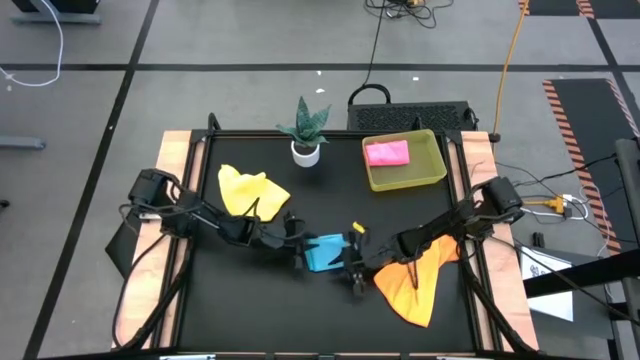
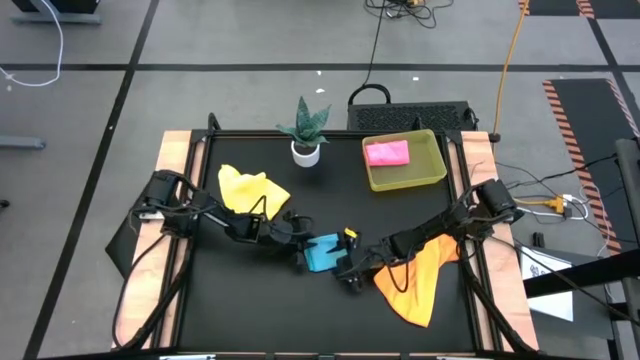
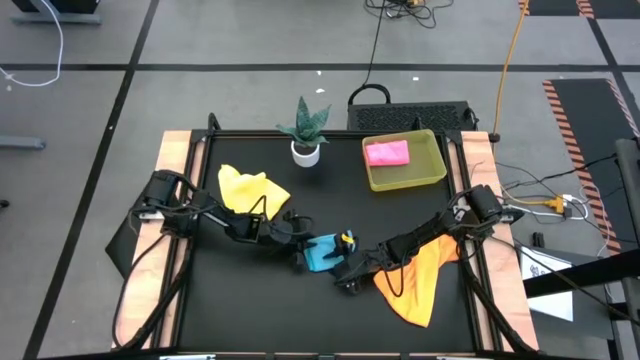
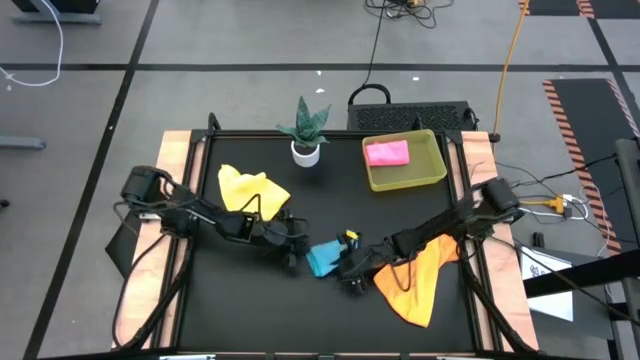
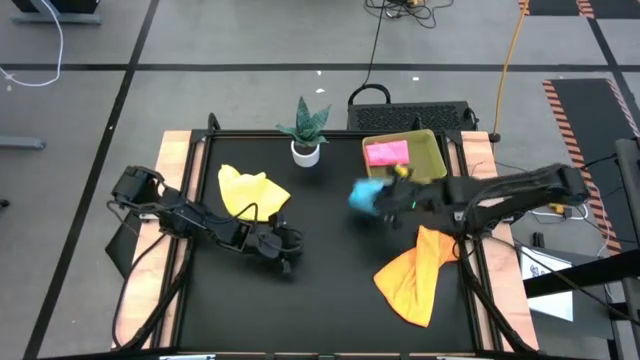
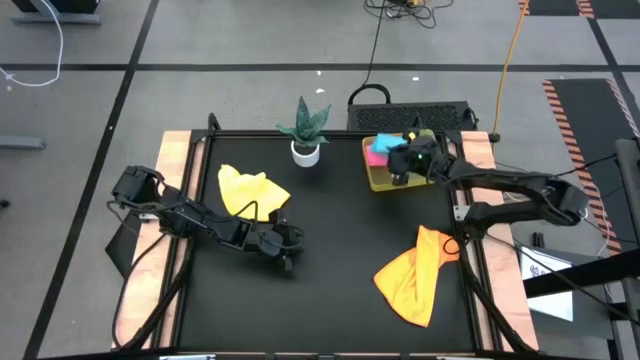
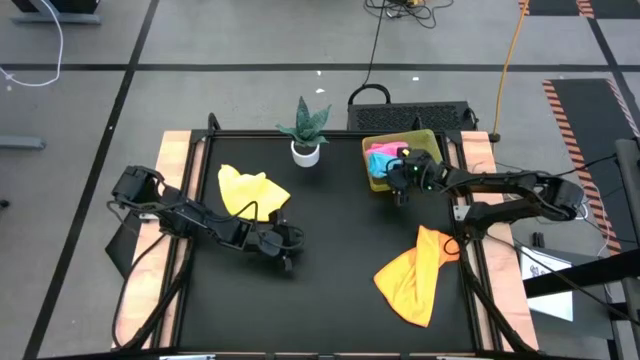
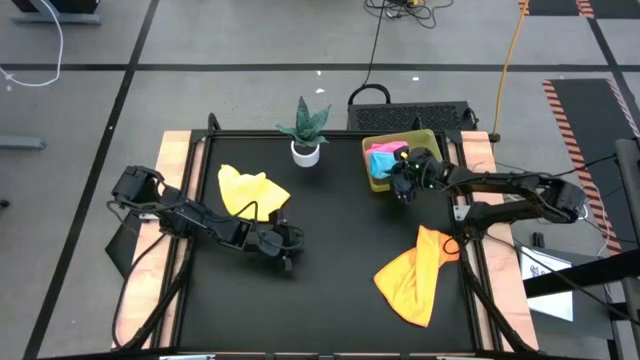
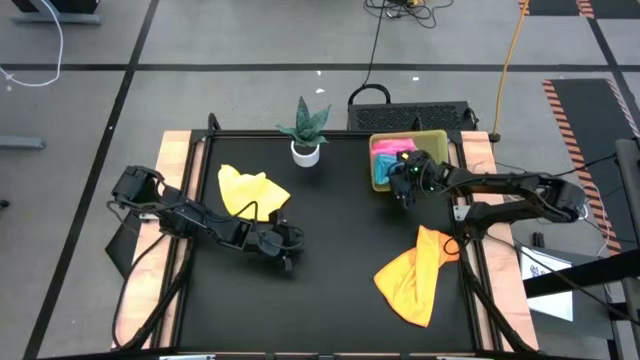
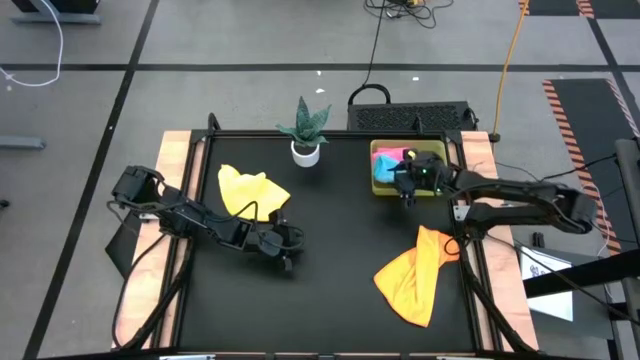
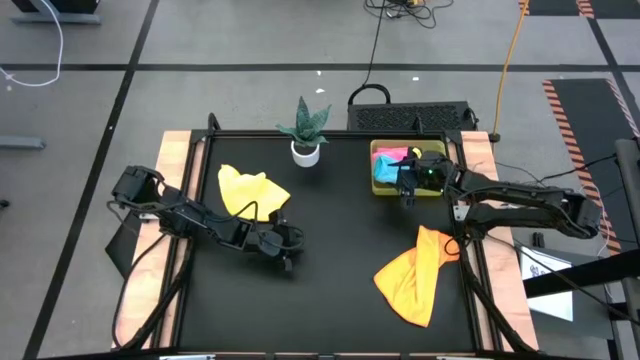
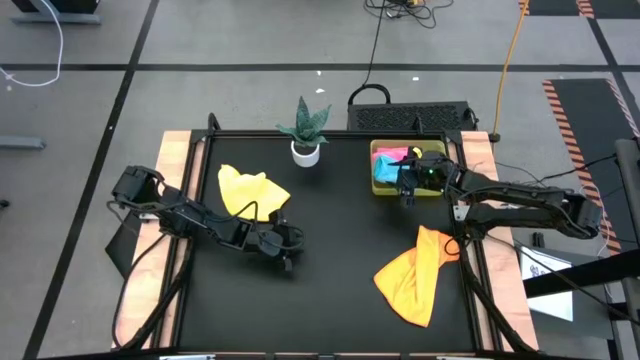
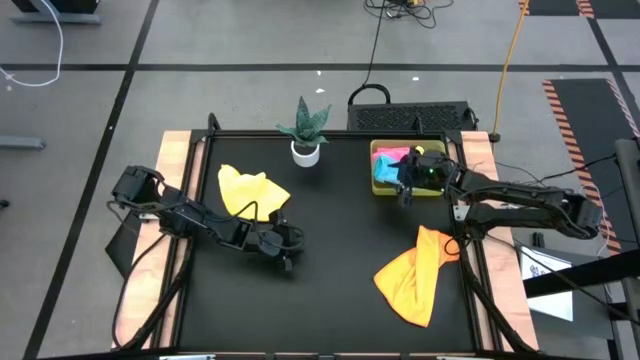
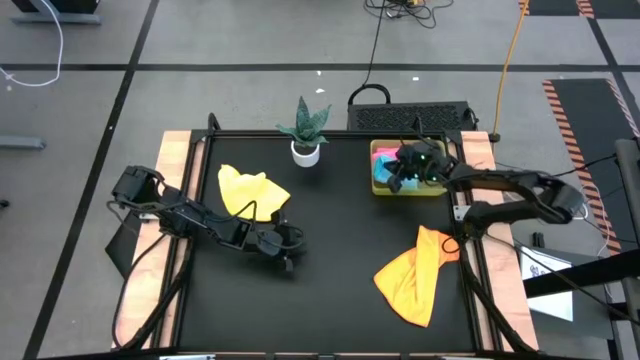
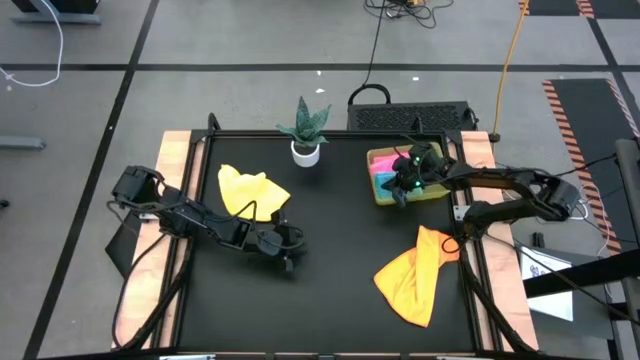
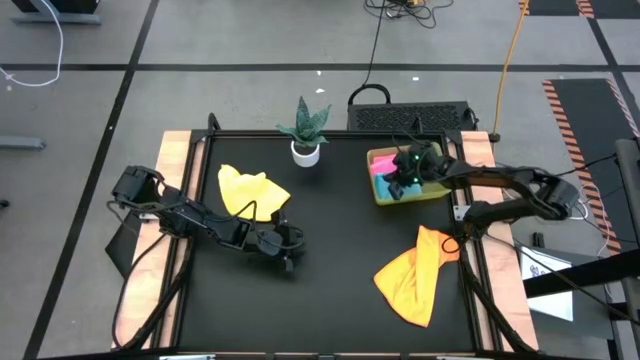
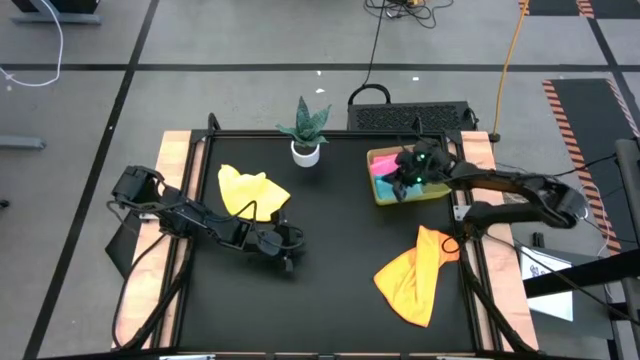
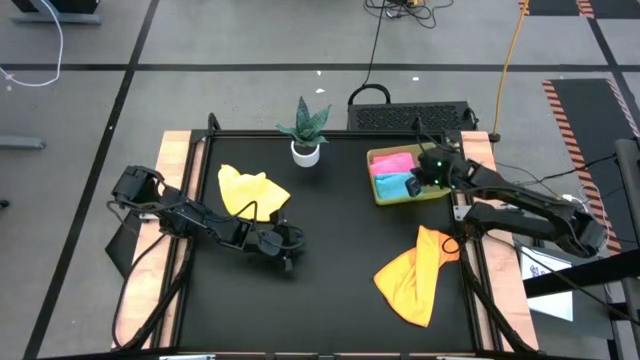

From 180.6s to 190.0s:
Task: Fold microfiber towels
Put the folded blue microfiber cloth into the yellow bin

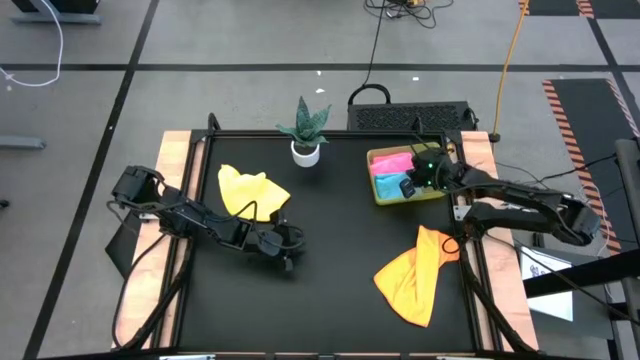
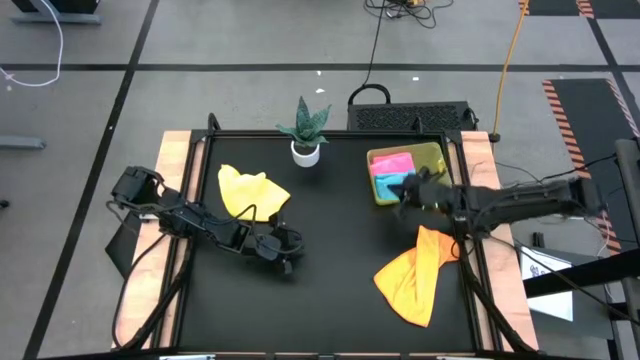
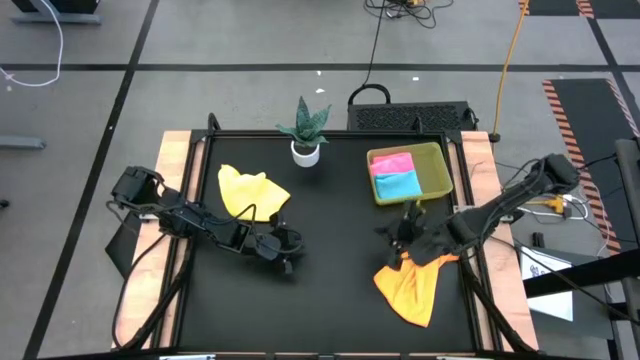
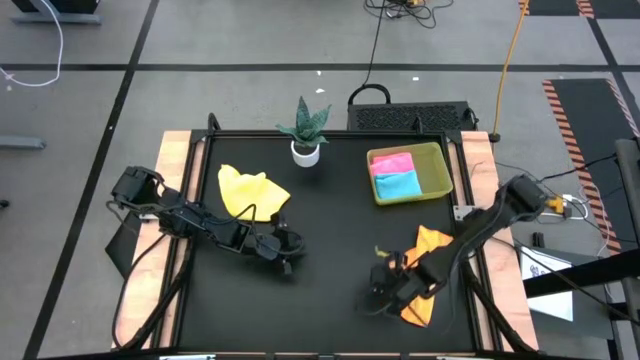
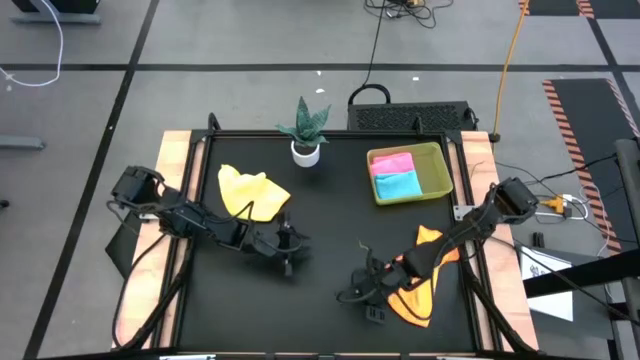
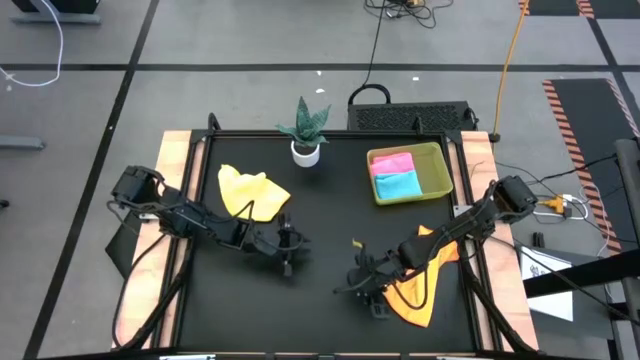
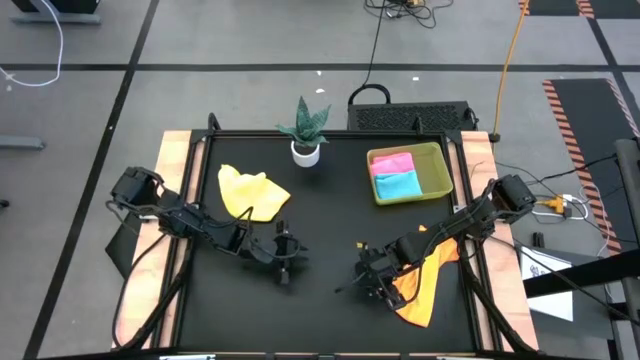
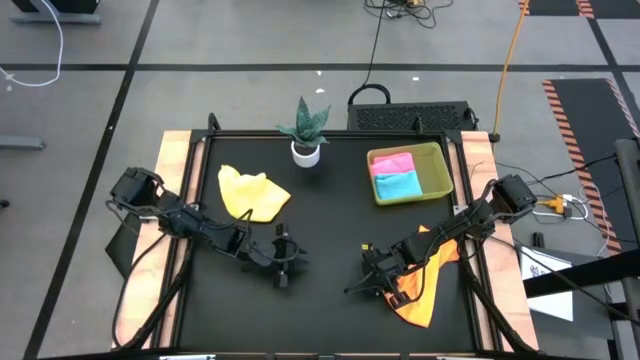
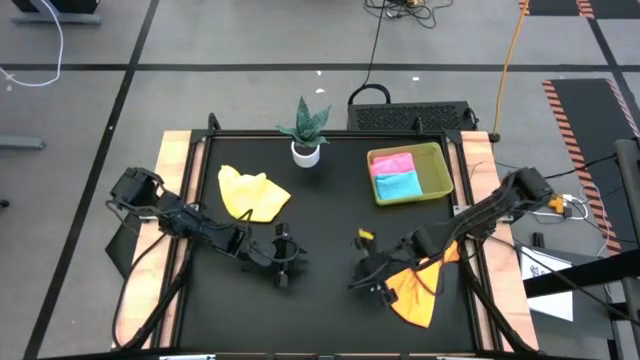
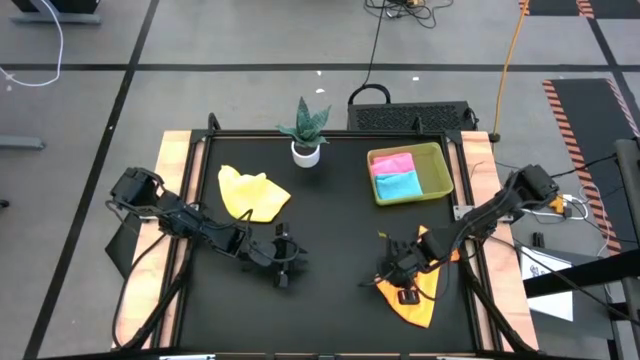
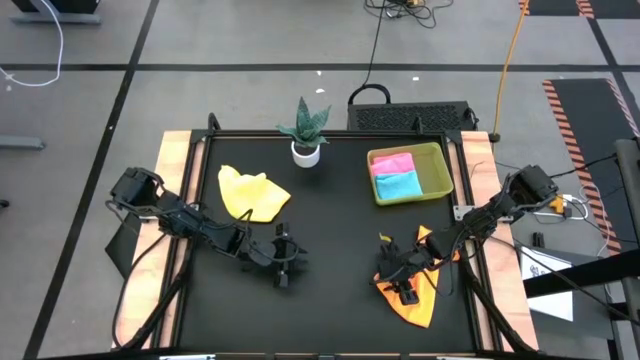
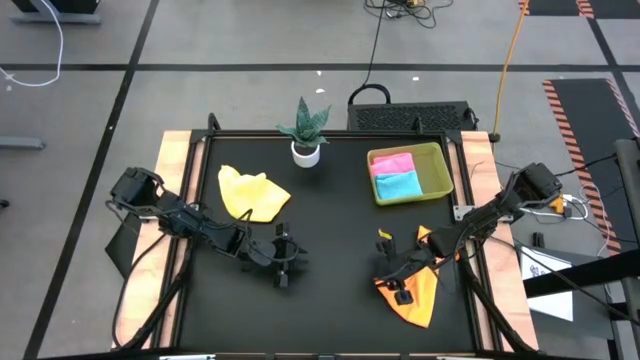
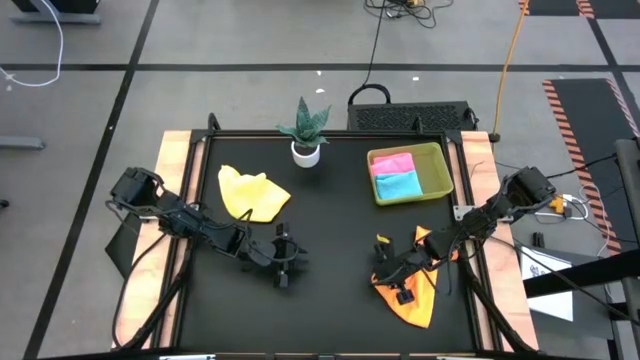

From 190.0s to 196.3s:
Fold the orange microfiber cloth

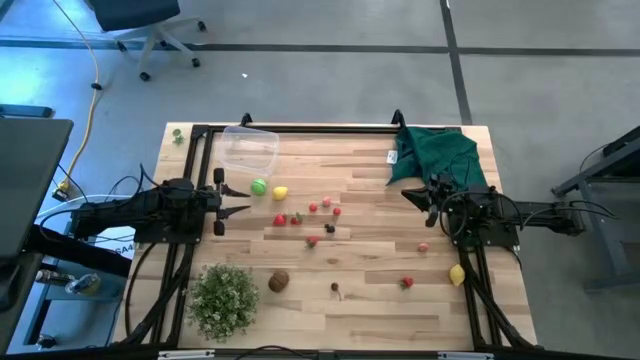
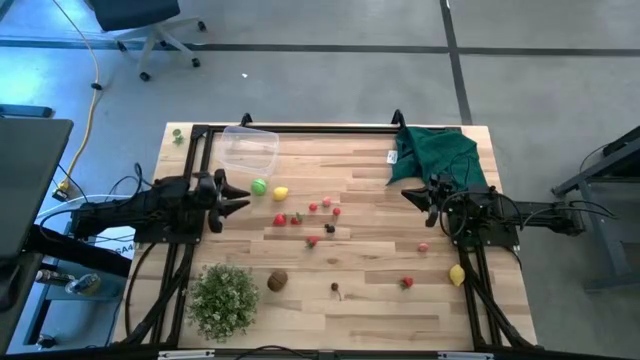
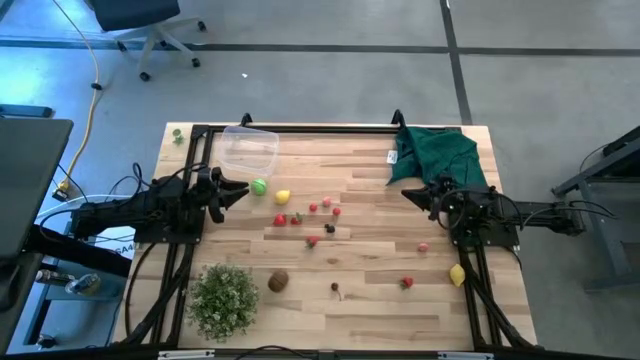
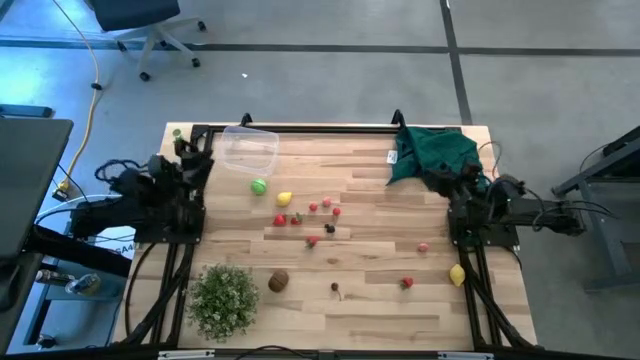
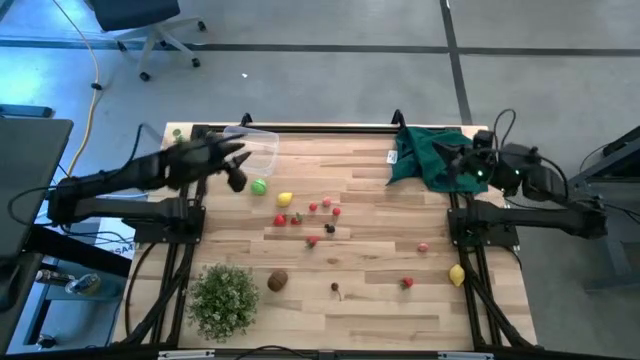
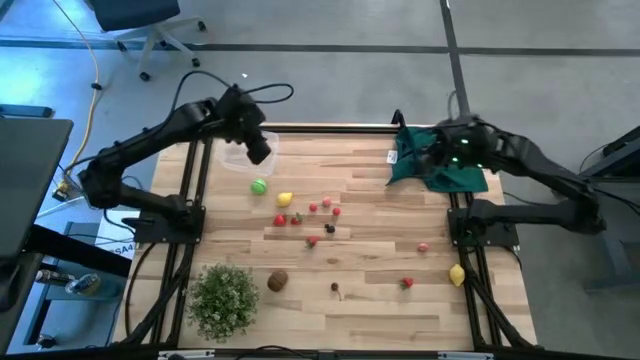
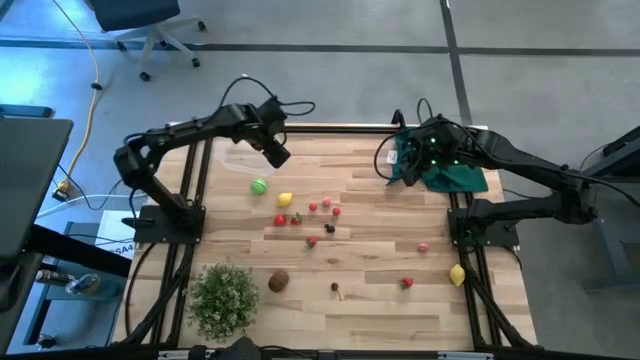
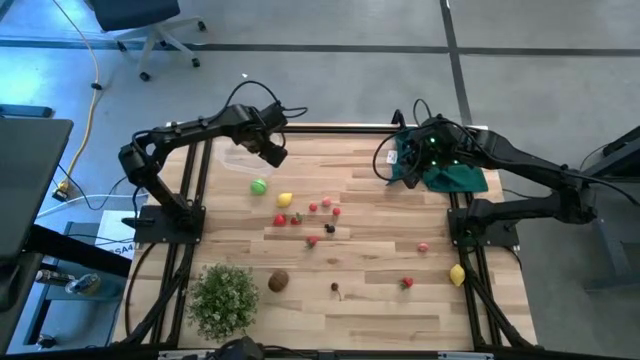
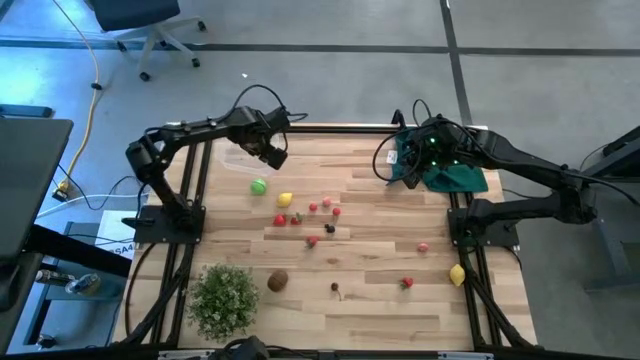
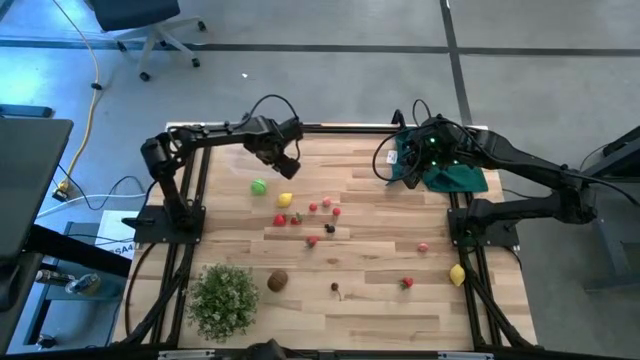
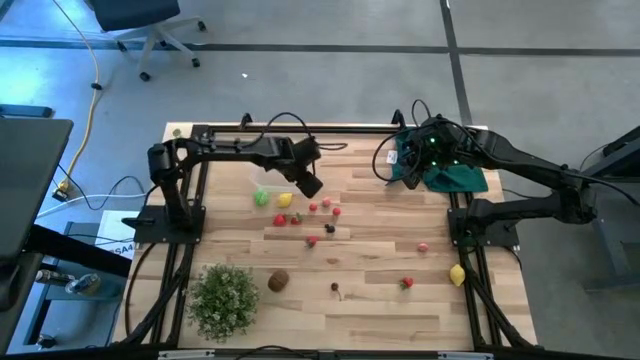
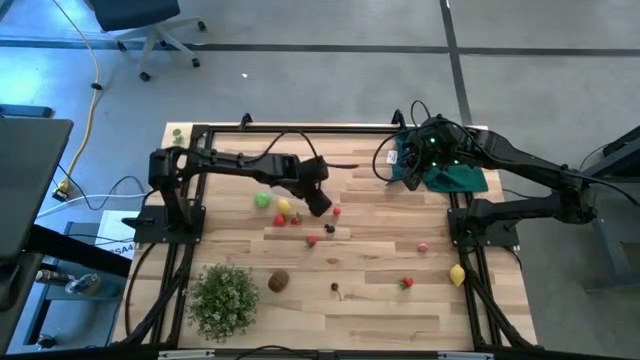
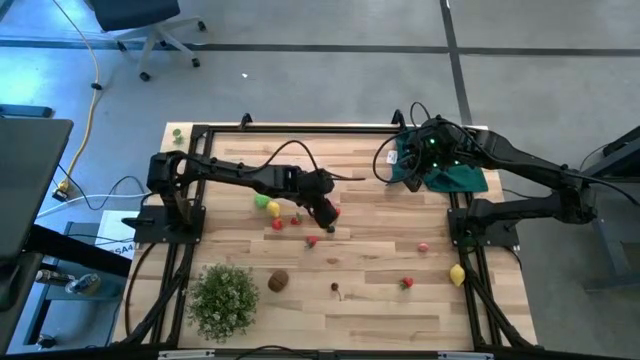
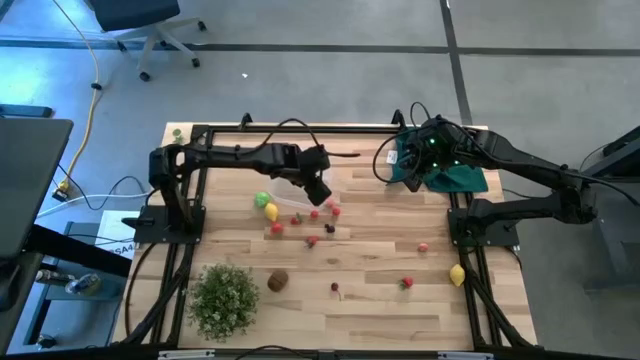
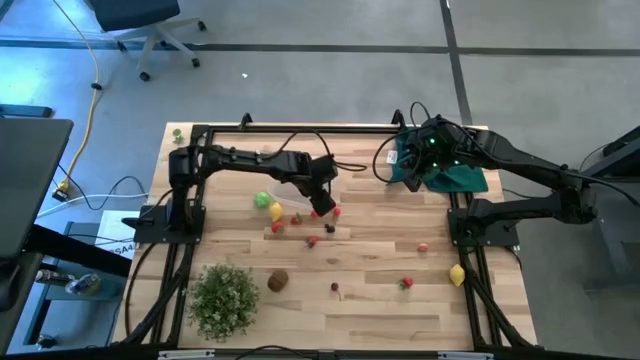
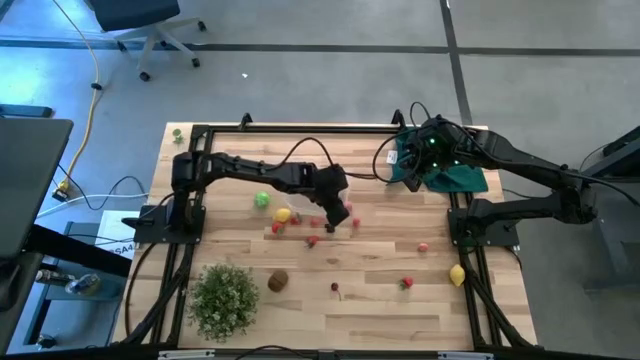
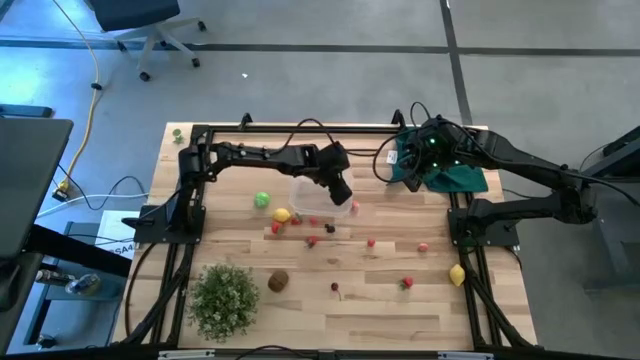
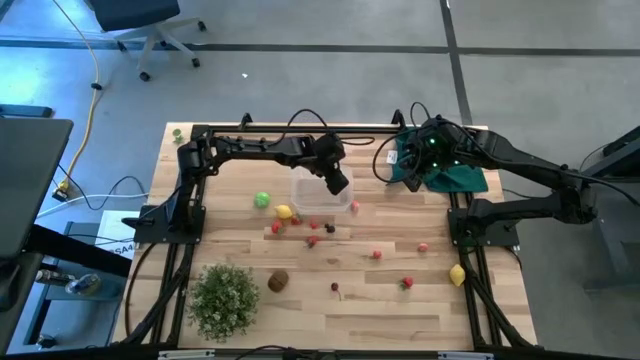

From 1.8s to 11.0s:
Task: Pick and placing Produce into tupperware
Prepare the transparent bin on the table
